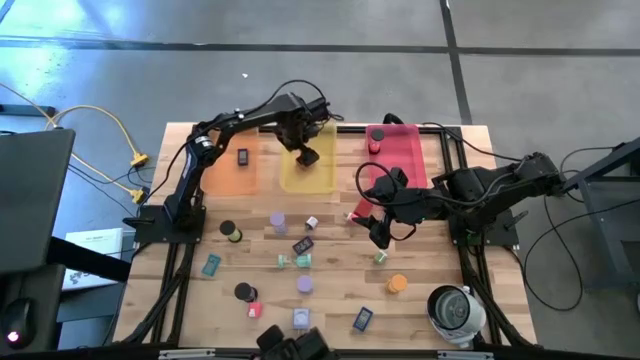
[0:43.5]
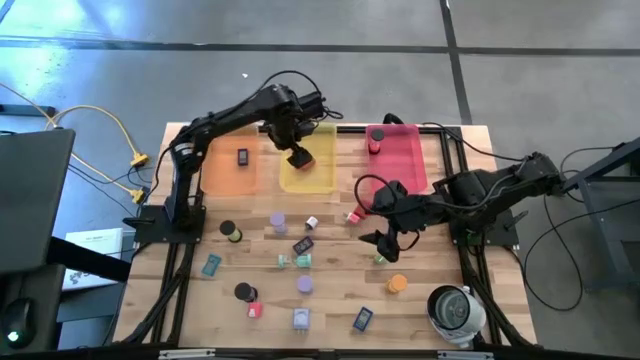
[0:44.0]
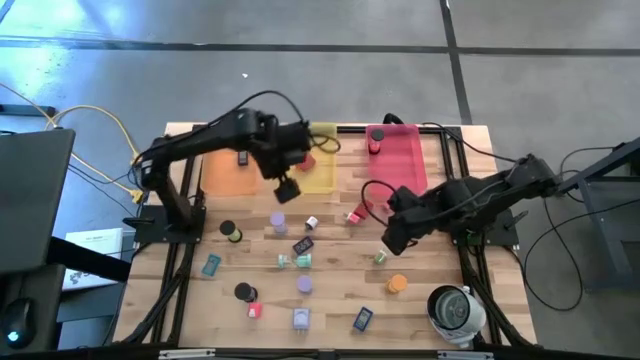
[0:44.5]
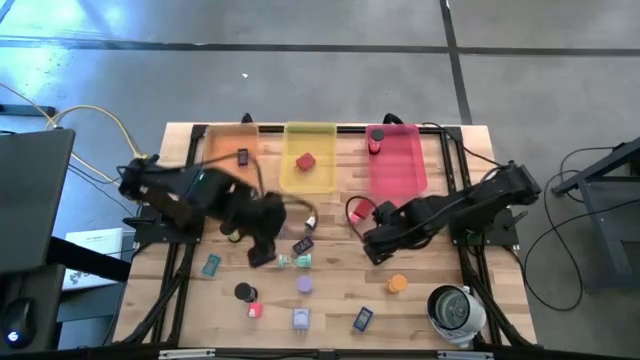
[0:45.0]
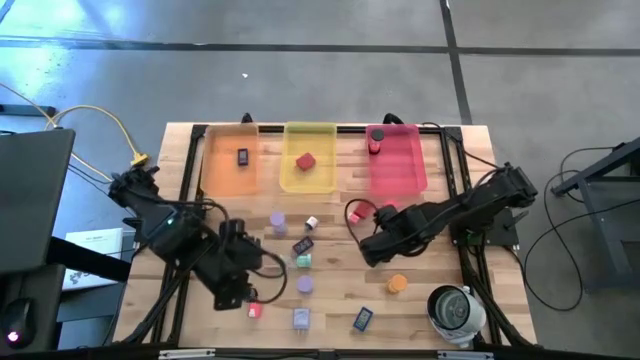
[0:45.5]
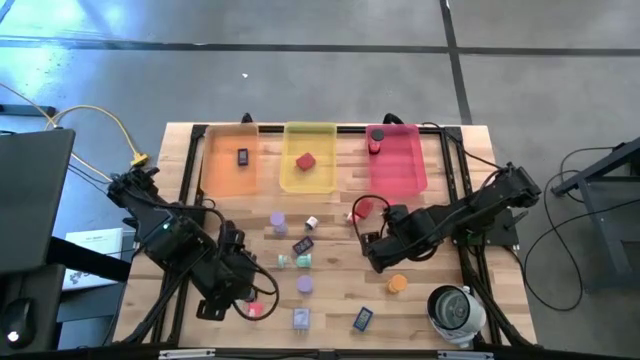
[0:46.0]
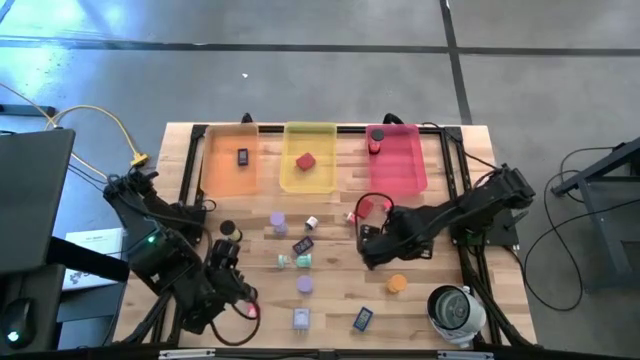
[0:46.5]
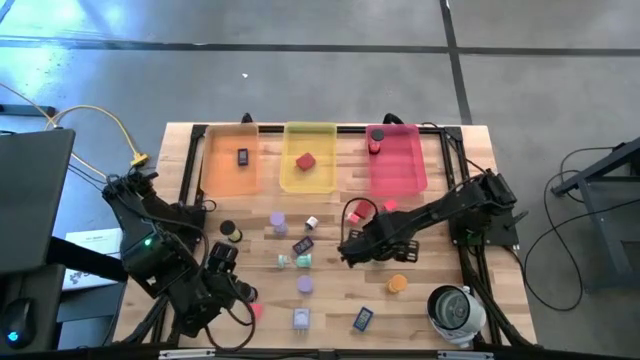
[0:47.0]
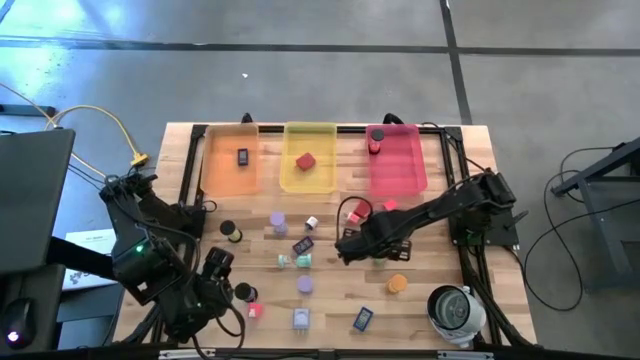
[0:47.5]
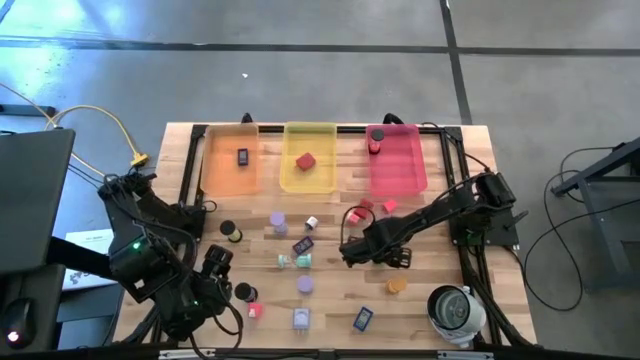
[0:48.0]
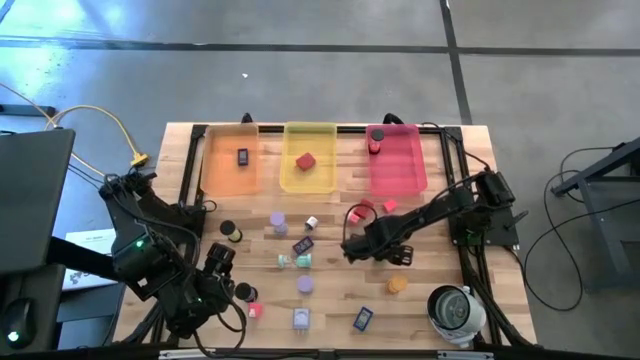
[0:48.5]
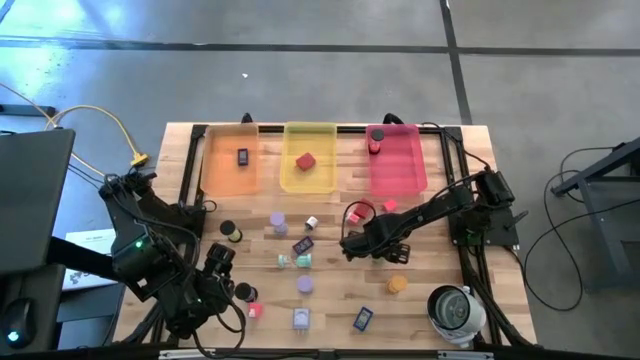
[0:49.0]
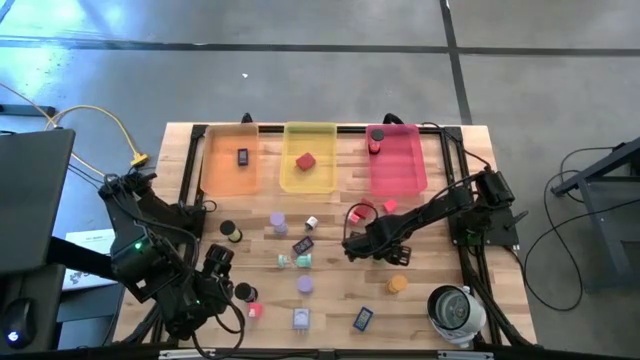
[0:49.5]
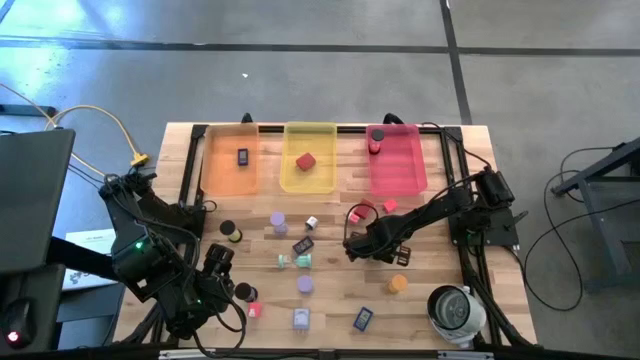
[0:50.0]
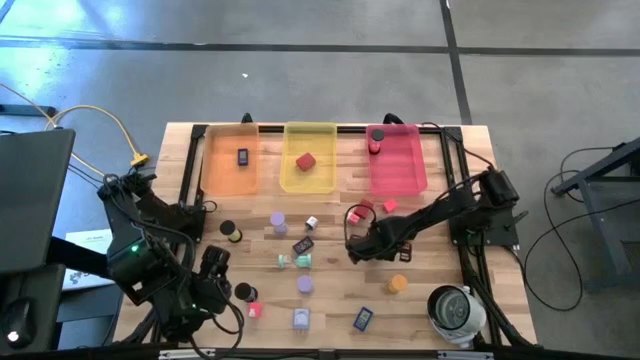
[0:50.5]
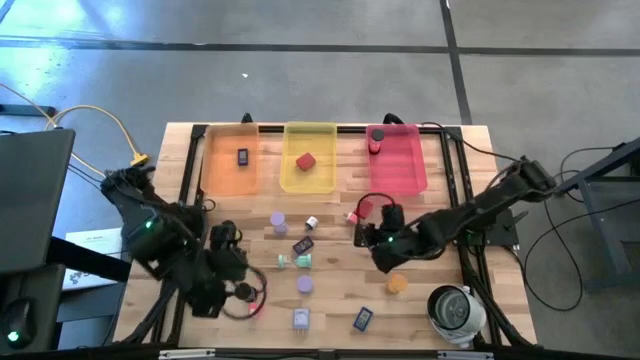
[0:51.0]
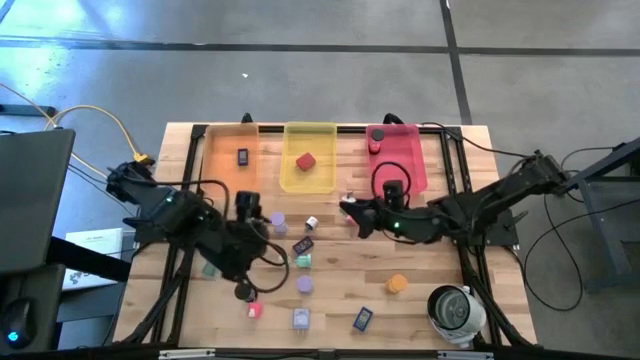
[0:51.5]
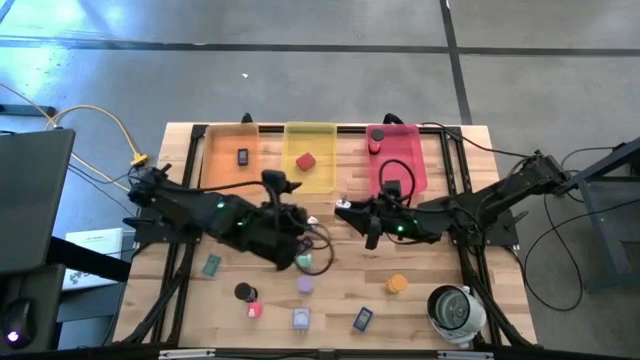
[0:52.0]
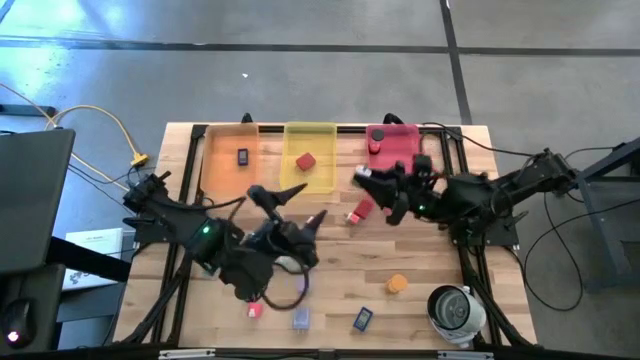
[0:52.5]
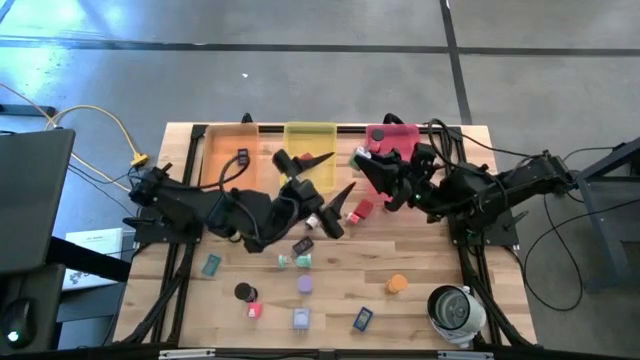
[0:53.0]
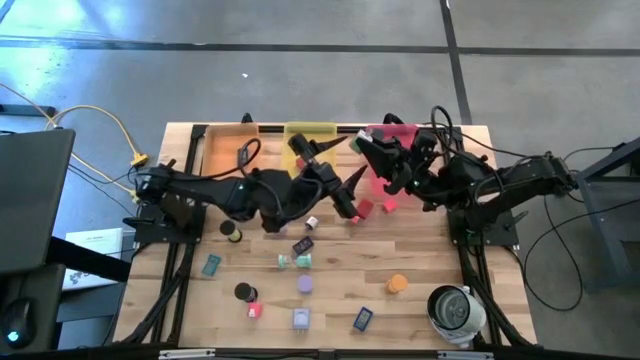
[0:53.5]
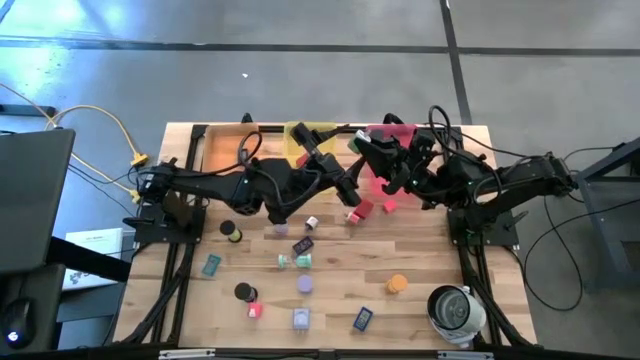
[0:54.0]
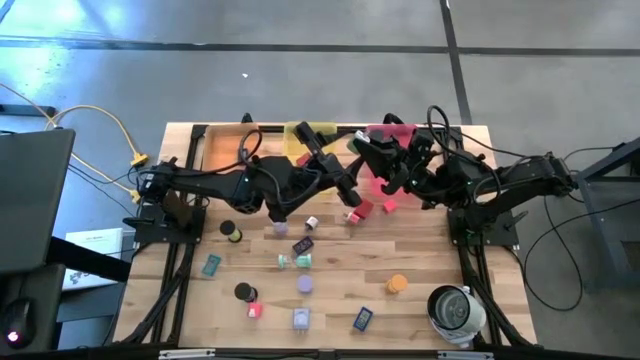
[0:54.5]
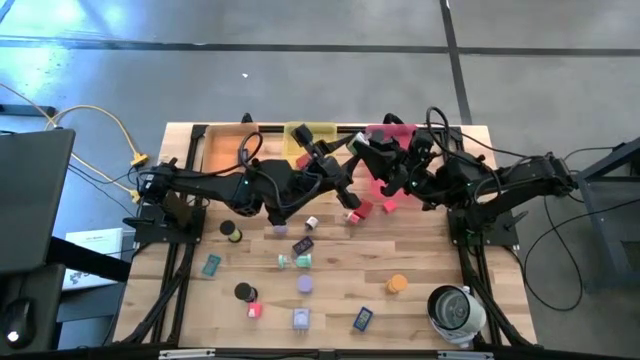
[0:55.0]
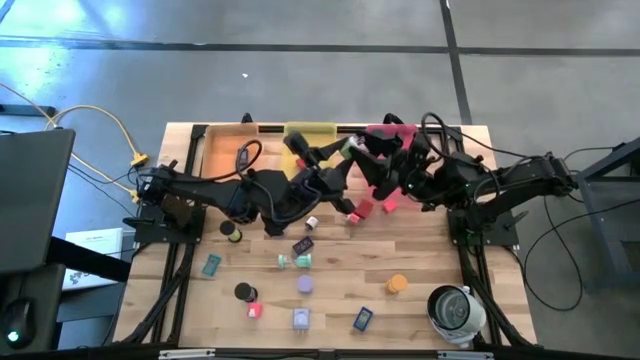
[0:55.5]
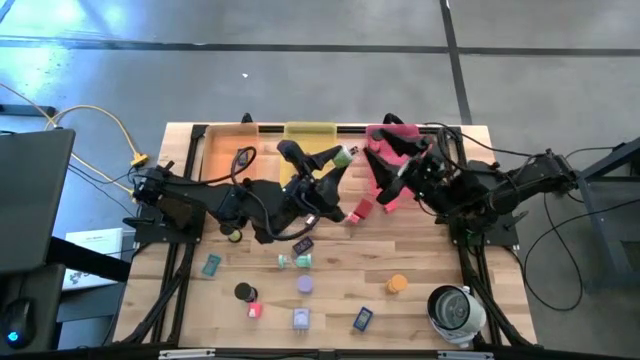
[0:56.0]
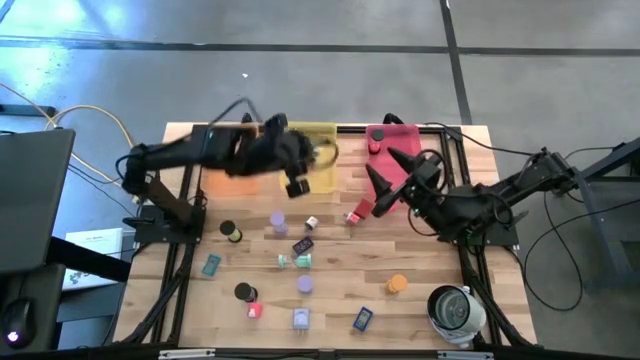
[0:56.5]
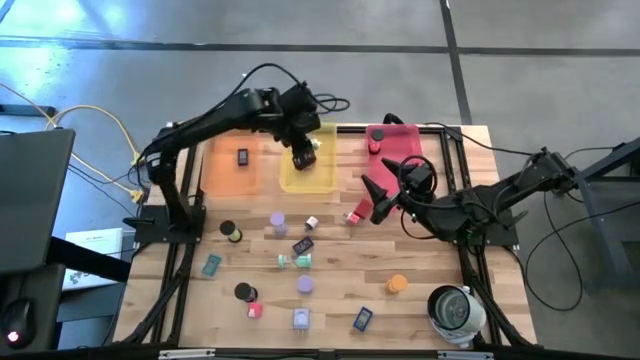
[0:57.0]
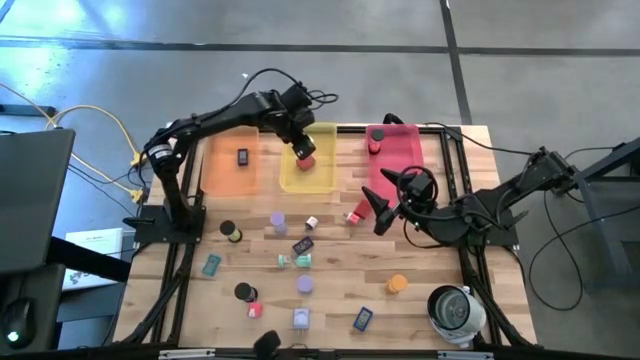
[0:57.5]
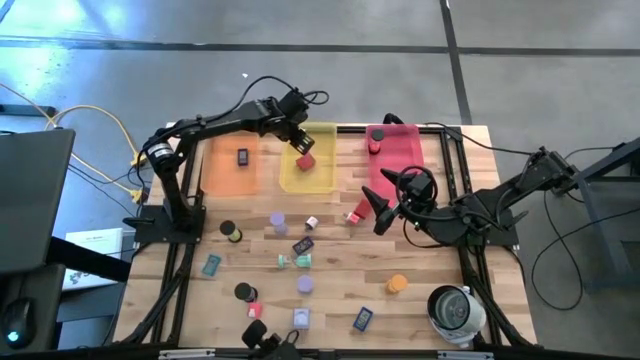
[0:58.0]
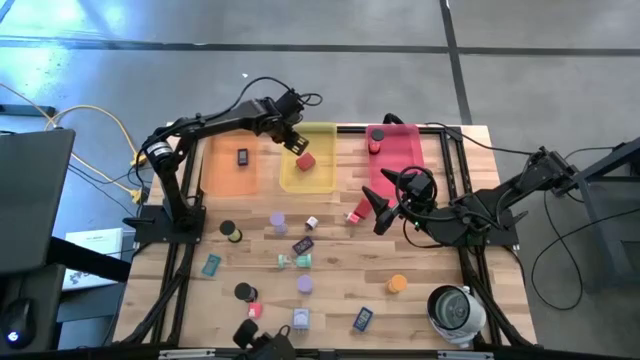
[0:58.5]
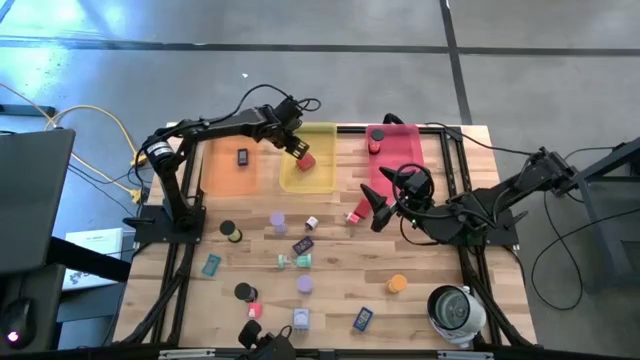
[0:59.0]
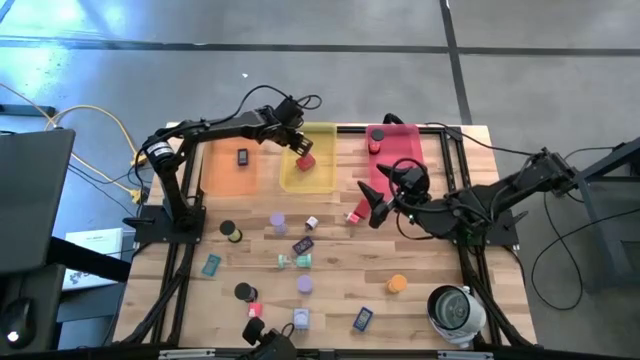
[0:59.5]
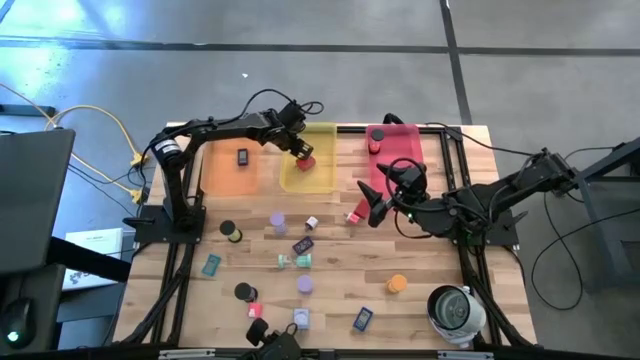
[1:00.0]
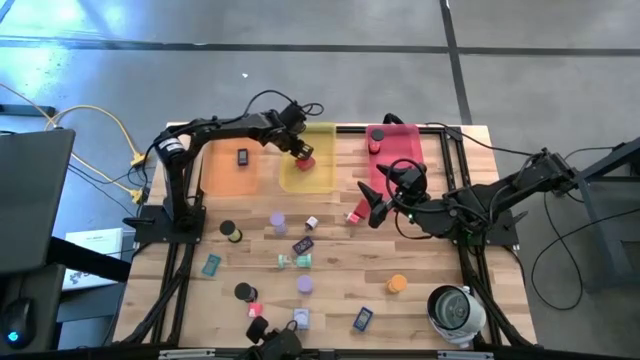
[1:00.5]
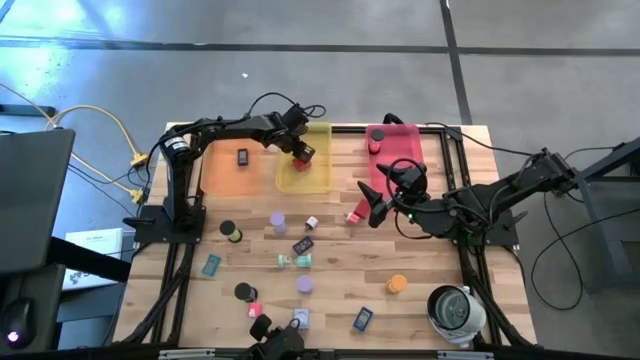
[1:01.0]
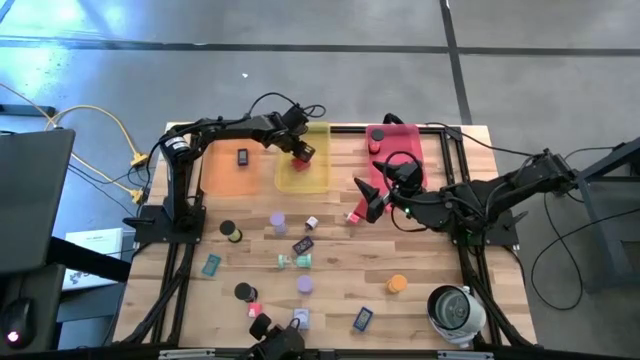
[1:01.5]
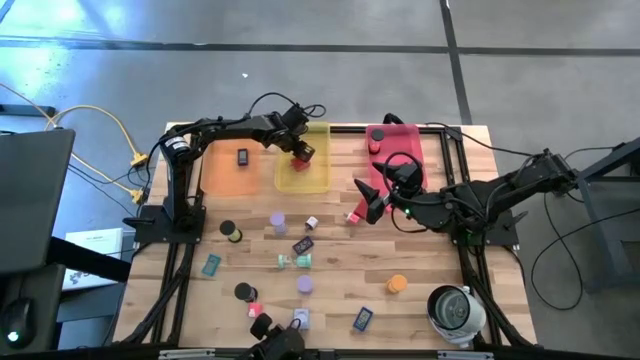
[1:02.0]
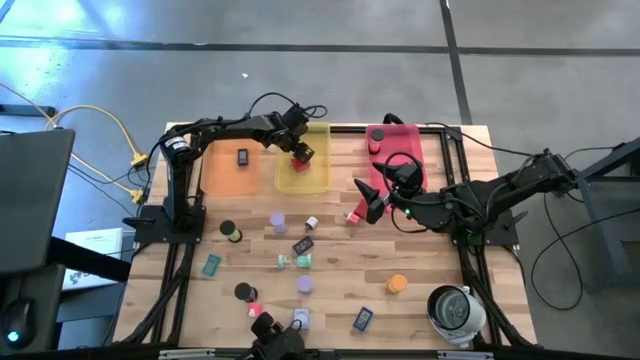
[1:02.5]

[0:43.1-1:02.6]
Task: Pick & Place Office items
Put the green charger adapter into the yellow bin
